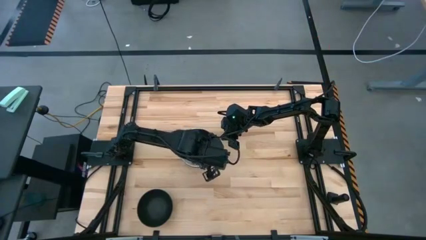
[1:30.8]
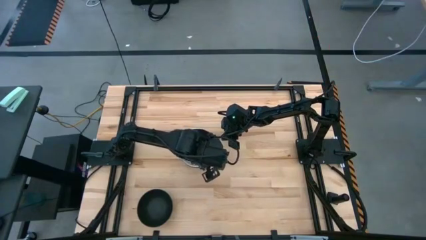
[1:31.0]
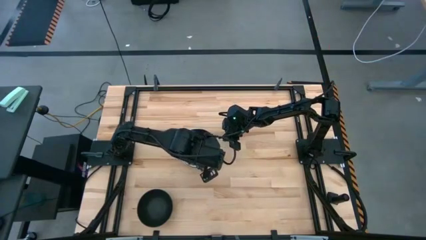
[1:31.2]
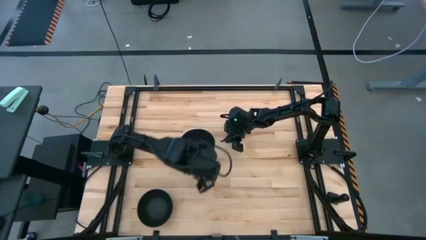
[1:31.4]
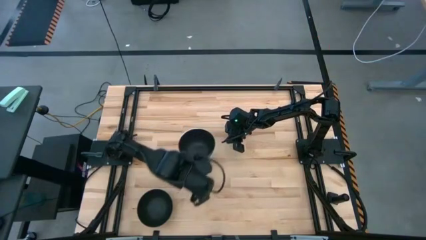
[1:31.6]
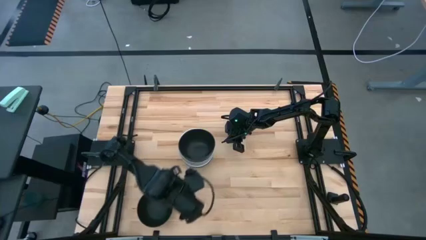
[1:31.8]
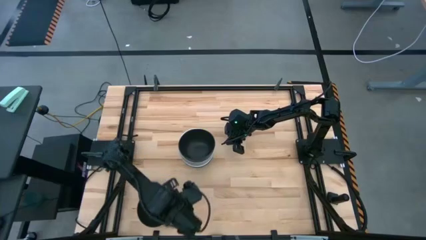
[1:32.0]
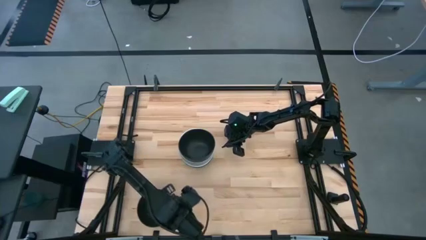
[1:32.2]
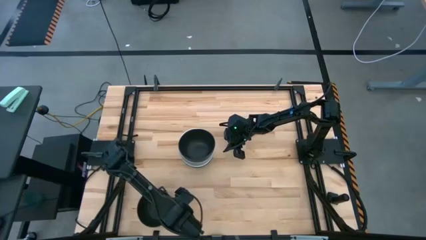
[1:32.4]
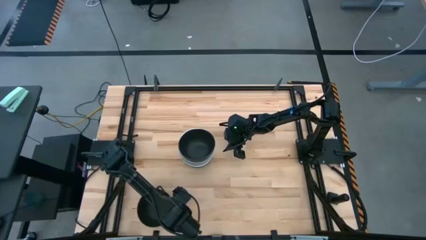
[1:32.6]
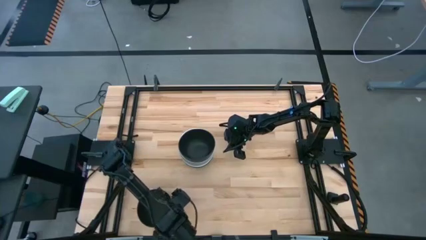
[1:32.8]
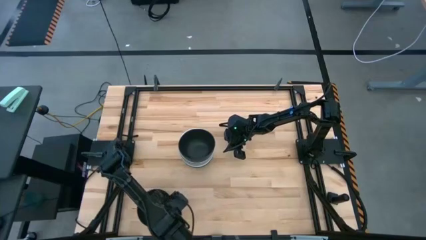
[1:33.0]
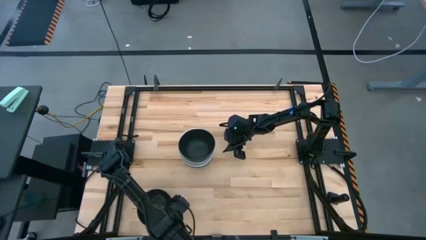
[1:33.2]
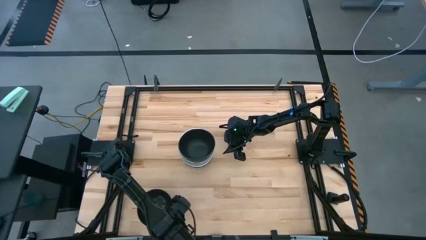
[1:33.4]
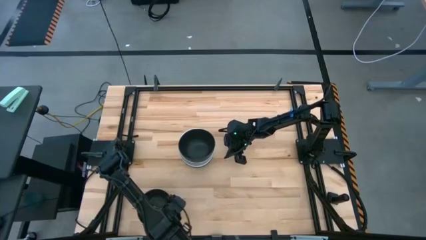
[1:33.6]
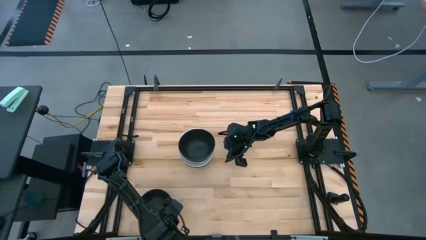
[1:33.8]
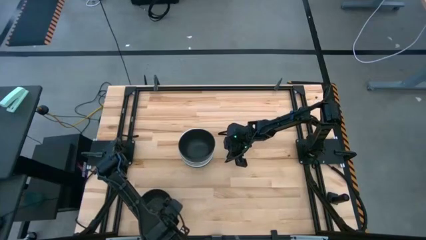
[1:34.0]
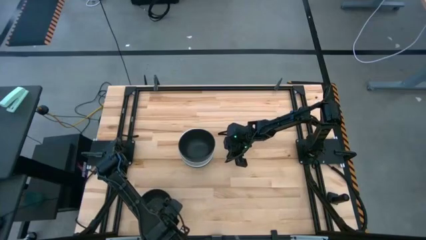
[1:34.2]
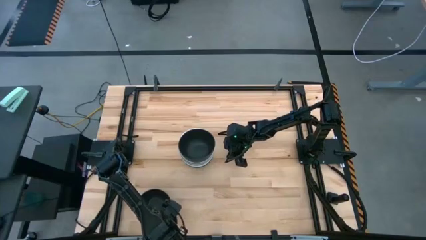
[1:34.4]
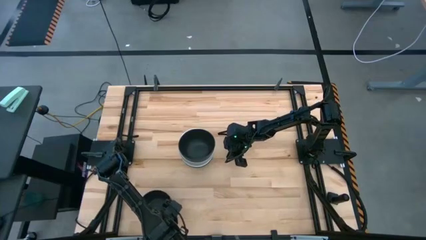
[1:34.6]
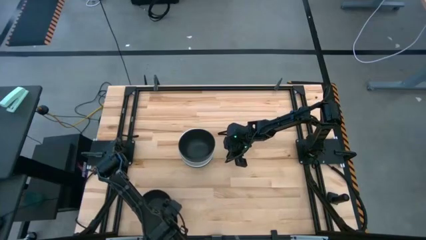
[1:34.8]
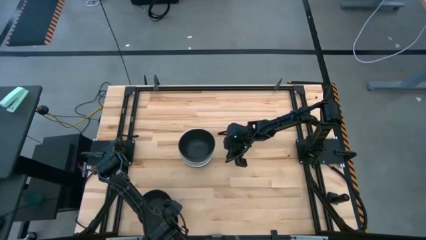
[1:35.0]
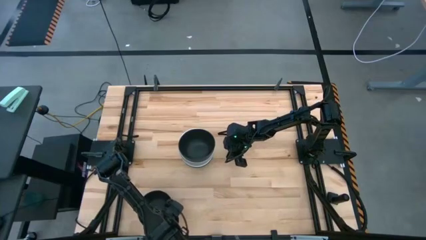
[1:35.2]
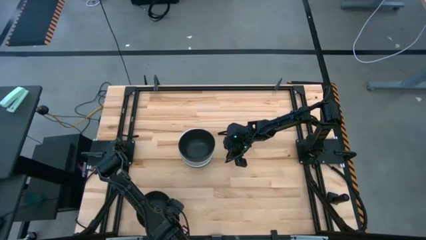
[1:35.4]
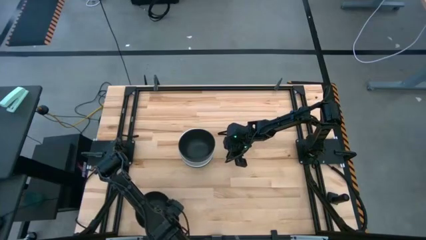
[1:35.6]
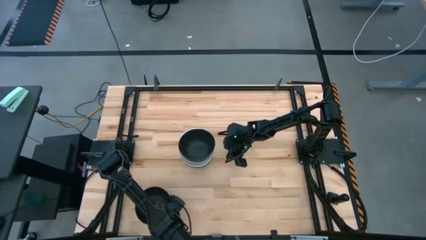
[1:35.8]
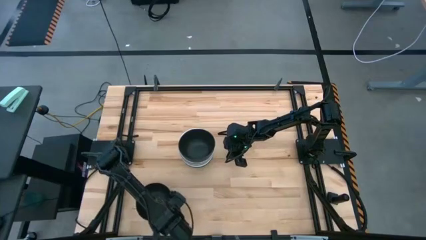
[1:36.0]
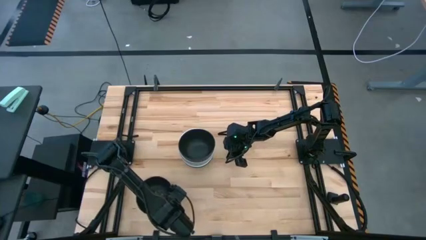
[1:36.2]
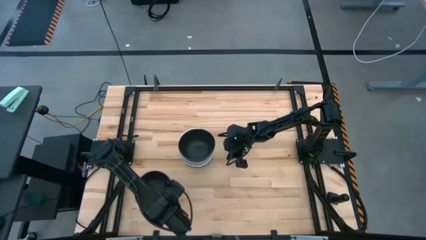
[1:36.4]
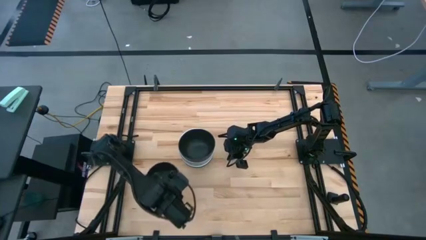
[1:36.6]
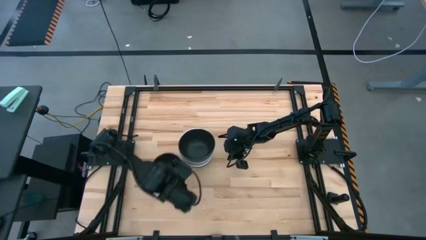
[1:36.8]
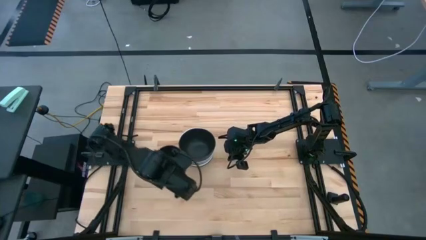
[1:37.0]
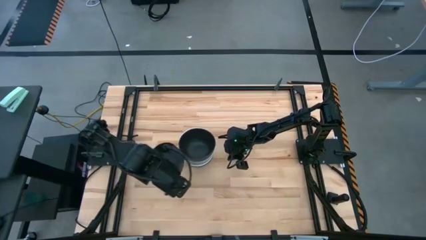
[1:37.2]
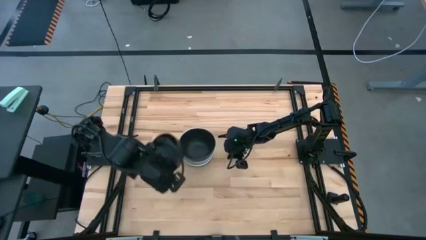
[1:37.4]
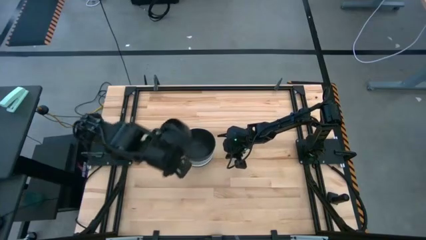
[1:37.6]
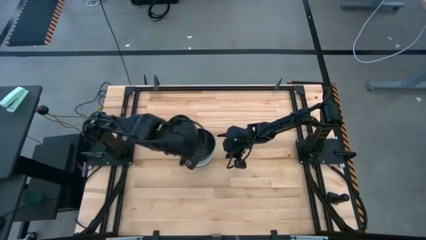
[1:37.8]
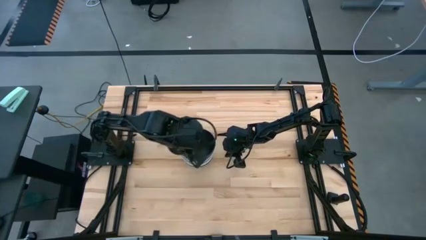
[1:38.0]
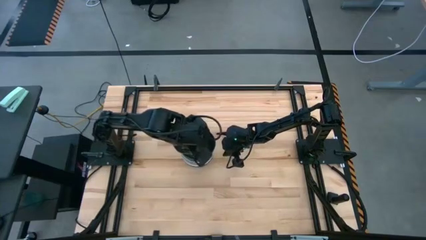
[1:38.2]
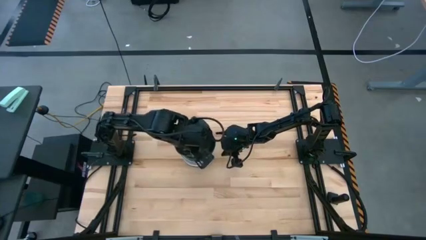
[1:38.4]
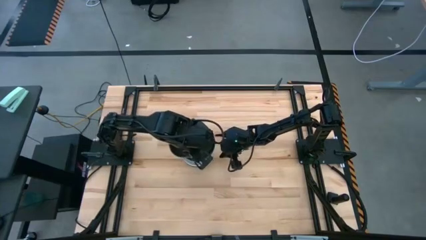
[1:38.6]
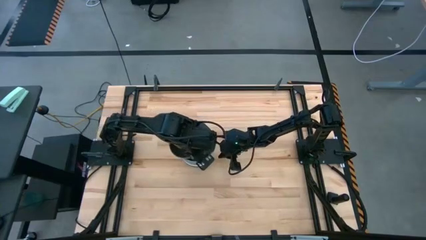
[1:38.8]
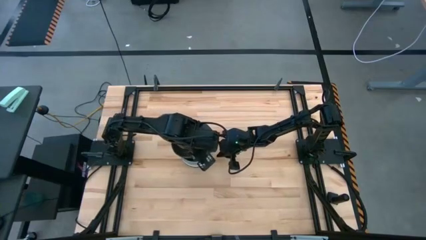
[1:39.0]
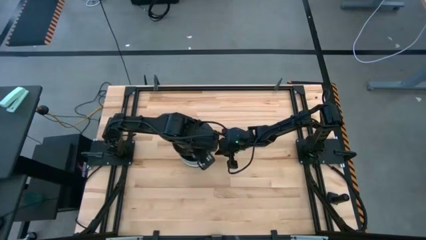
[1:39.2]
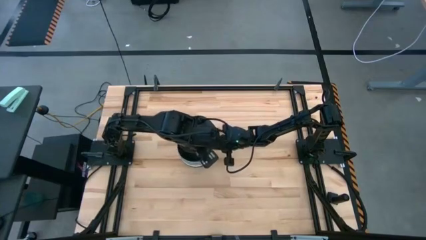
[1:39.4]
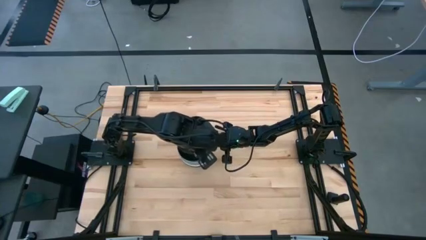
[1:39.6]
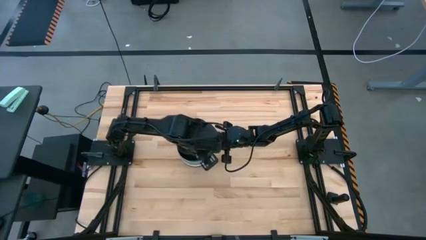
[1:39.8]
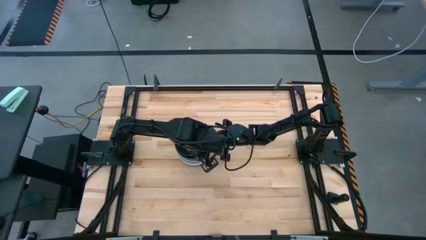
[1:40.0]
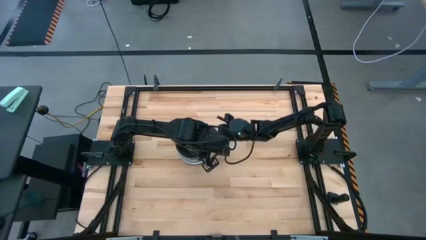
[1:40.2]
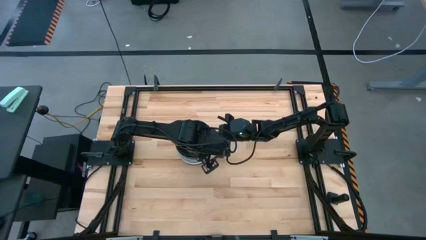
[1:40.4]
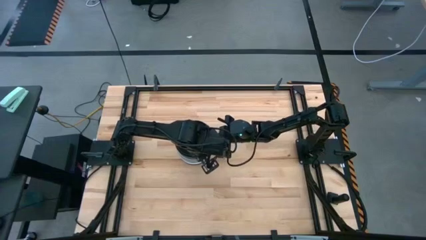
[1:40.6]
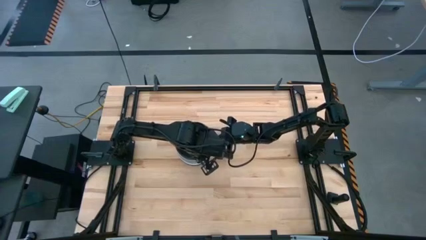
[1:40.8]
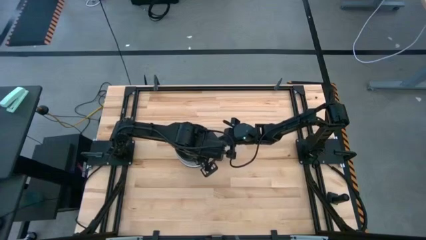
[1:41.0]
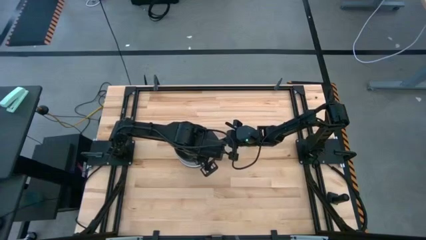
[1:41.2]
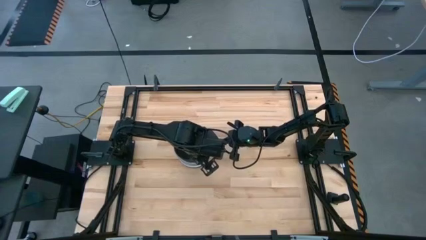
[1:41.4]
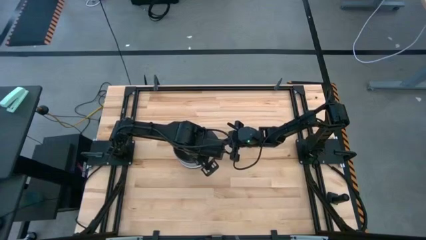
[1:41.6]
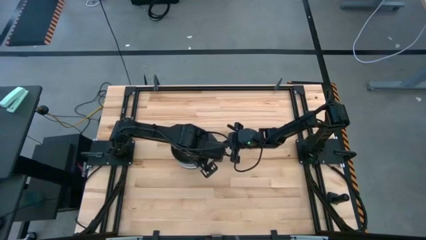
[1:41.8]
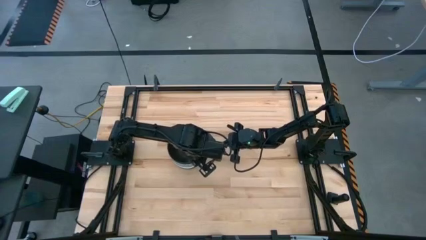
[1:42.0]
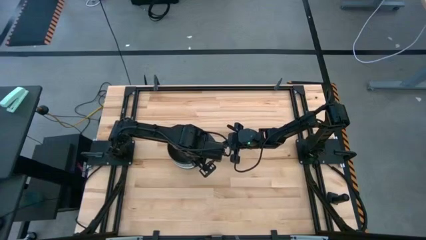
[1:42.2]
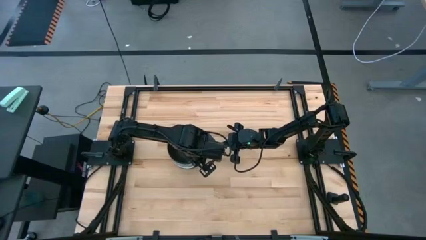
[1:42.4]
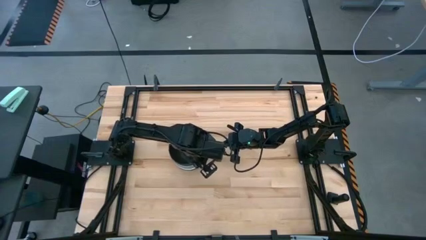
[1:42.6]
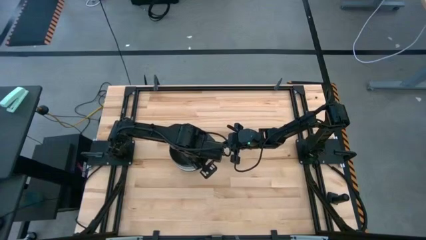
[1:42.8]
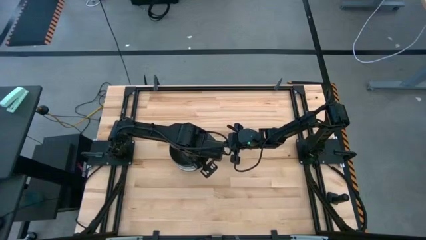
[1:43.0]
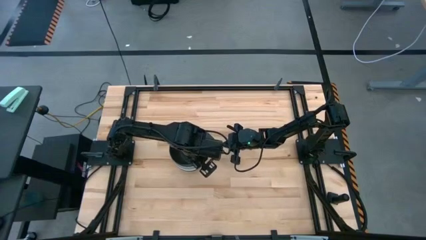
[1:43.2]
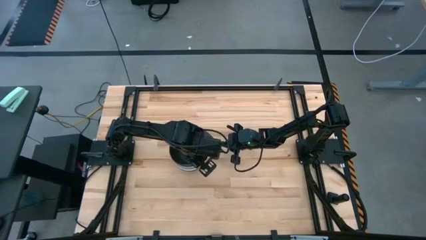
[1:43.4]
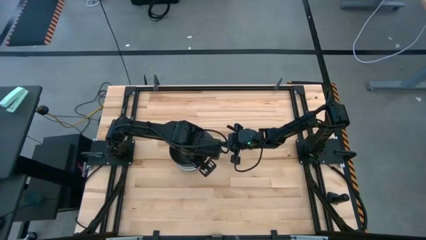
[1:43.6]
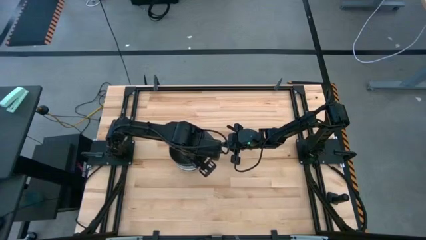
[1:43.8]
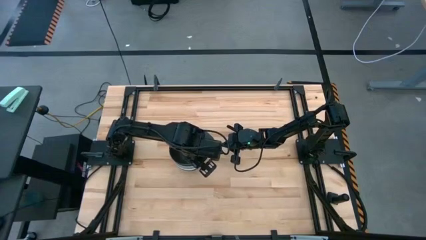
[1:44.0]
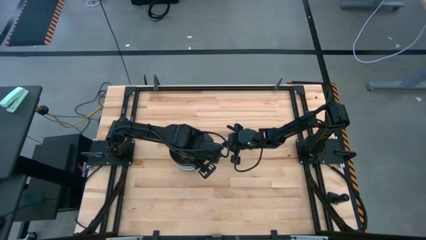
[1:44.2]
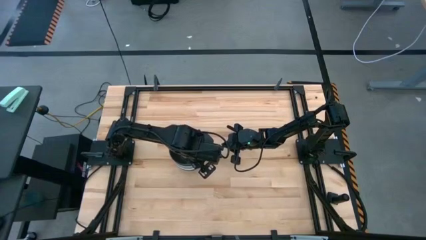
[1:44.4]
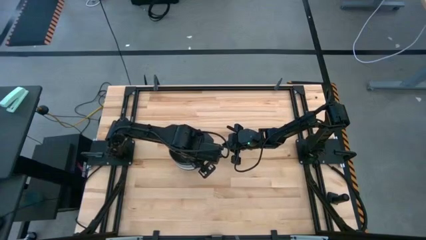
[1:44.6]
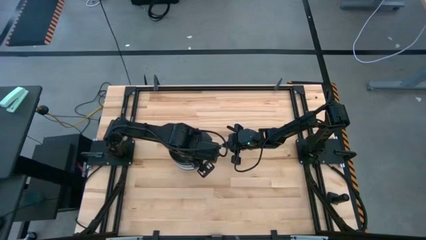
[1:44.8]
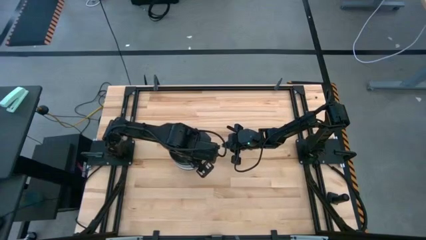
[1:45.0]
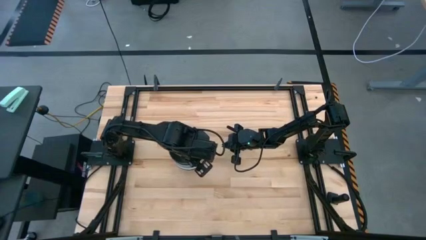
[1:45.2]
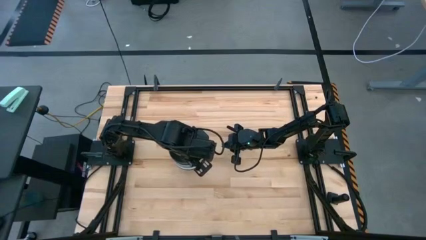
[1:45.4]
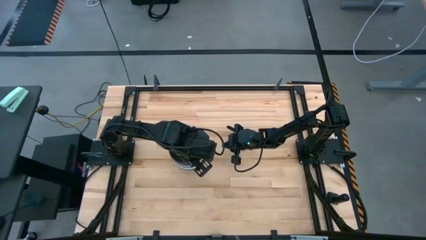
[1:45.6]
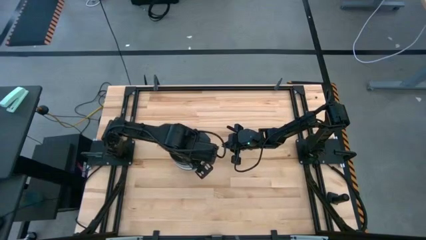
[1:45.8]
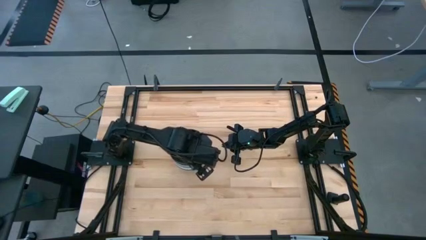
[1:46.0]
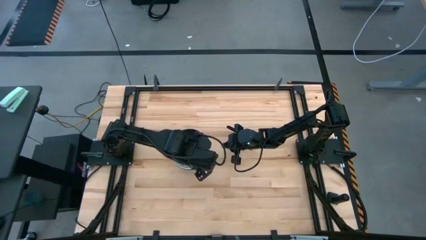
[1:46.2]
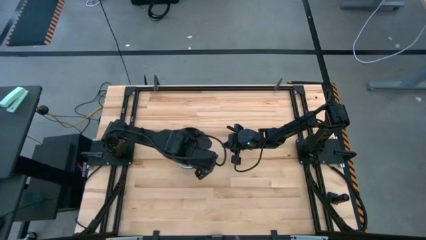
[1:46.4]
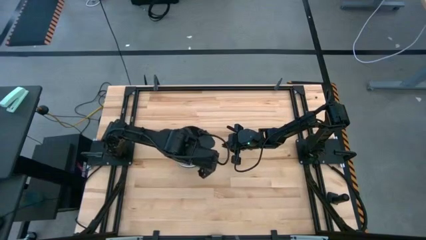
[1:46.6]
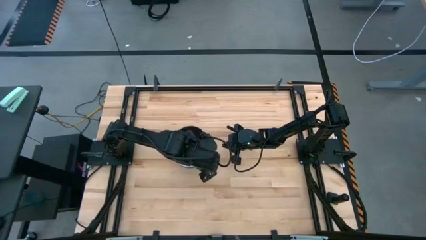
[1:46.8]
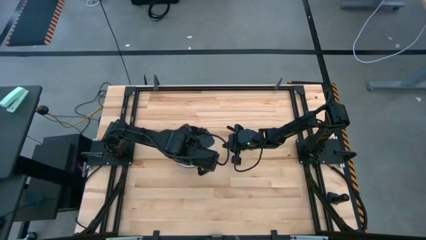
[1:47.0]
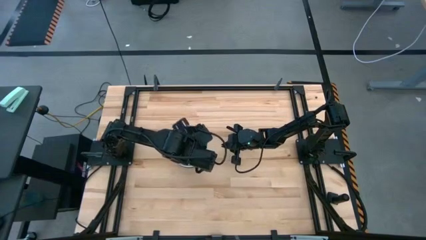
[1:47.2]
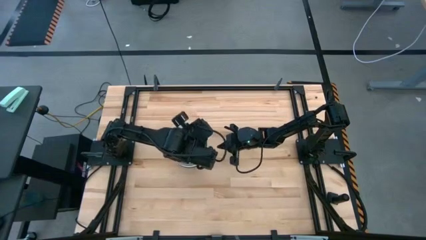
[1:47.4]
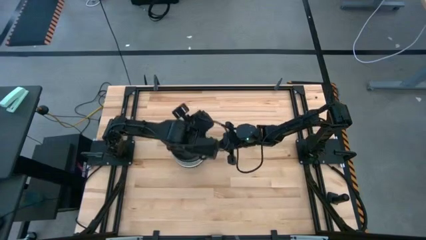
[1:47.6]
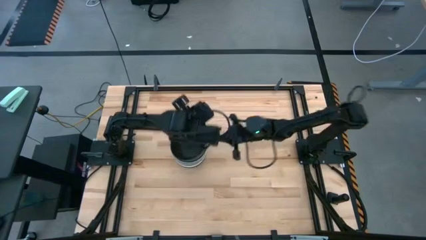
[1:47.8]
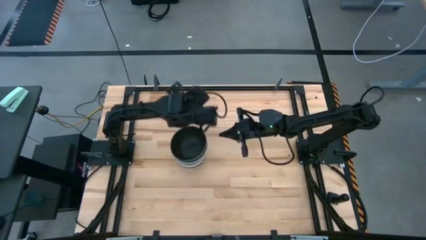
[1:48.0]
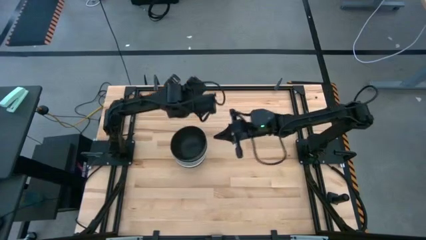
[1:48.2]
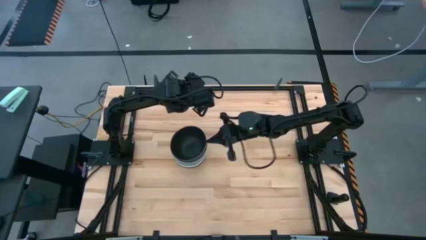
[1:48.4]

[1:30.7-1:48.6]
Task: Nest bowls inside each other
Stack the black bowl on top of the black bowls
